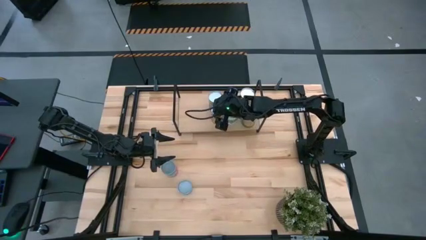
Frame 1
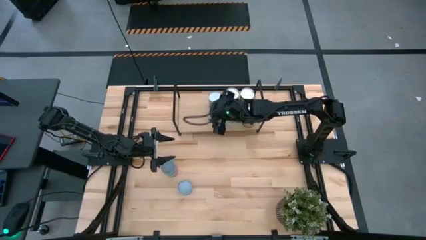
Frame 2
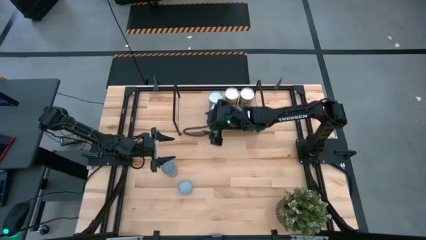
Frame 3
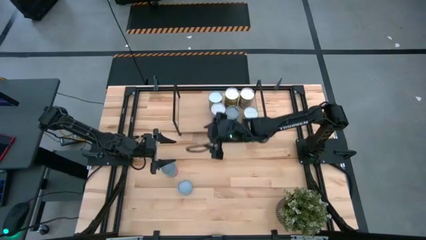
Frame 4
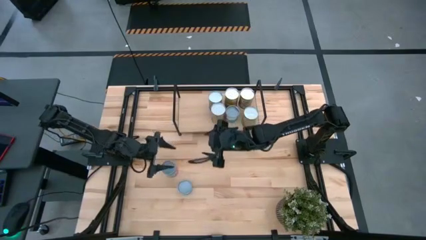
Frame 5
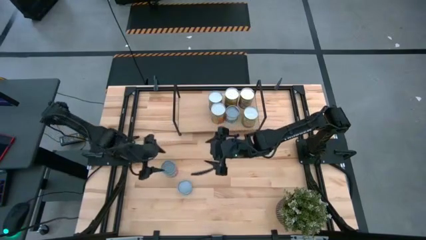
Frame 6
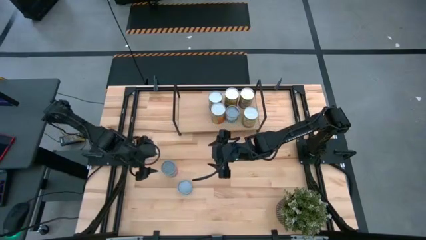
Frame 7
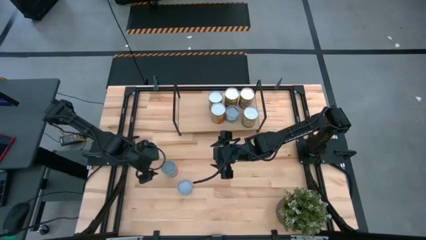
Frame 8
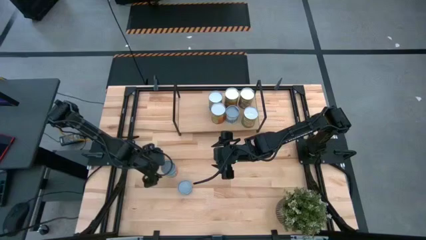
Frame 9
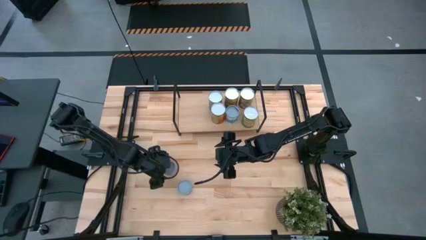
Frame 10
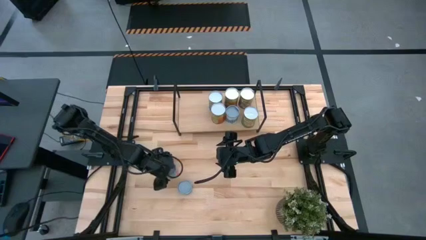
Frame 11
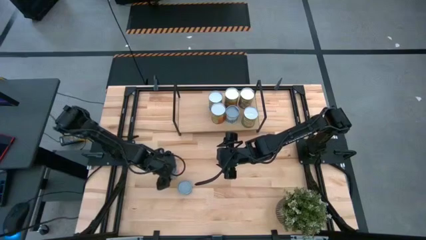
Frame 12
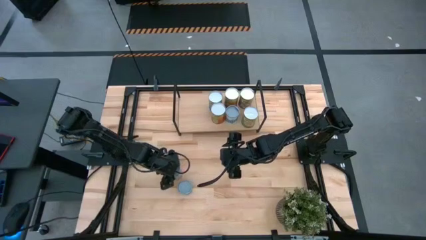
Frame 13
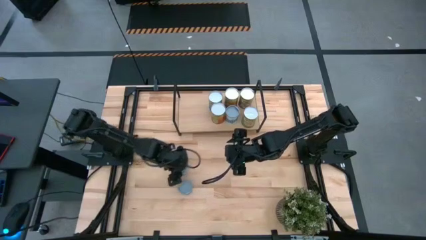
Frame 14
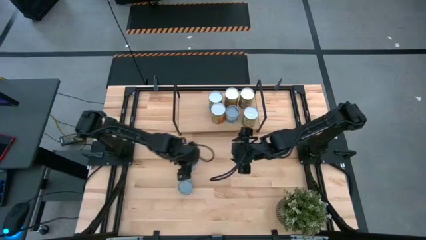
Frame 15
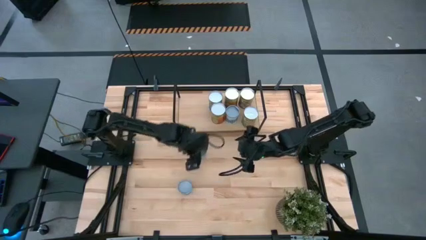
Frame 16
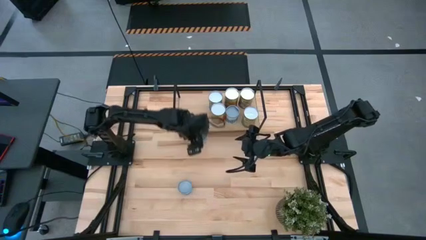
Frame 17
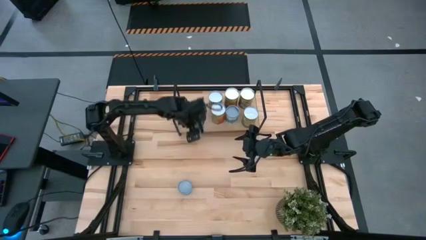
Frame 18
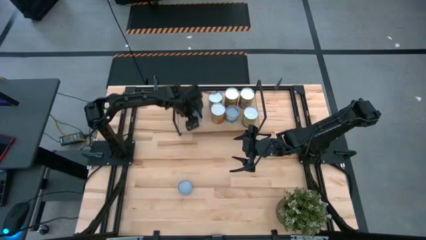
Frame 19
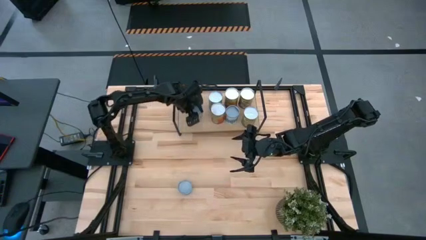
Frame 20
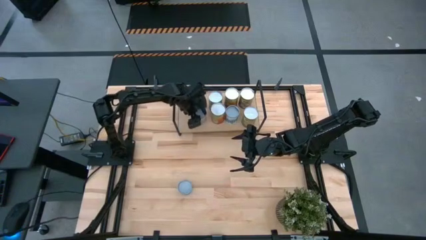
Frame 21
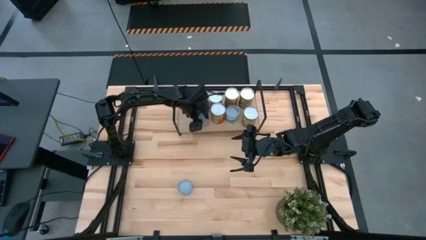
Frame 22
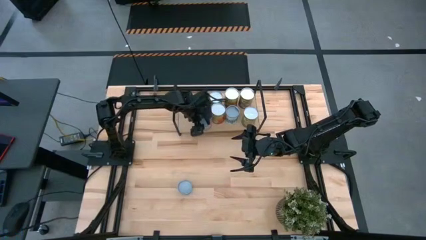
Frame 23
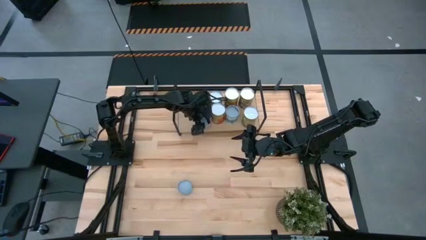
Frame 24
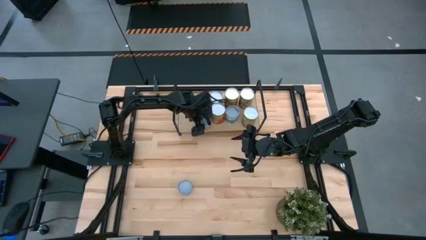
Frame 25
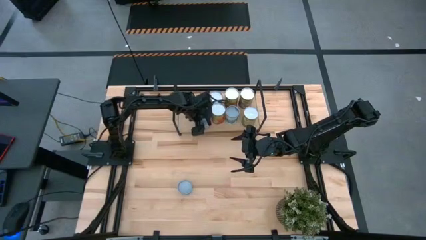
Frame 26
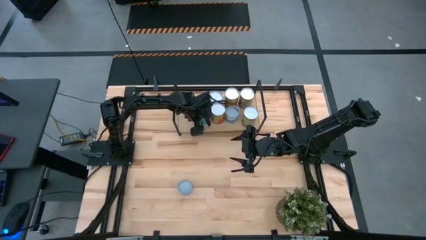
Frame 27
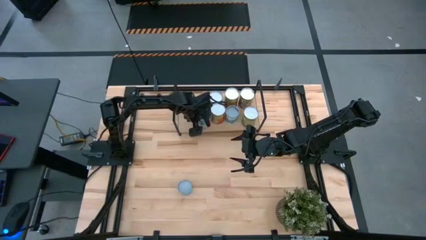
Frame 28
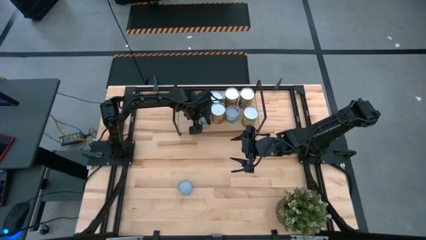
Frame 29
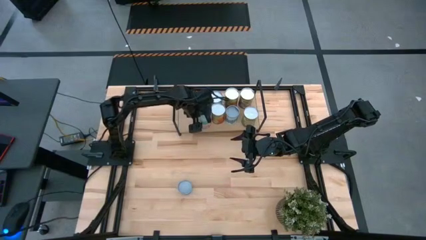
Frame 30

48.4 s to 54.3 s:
Task: Pick and place cans onto a shelf
Put the canned chicken soup on the shelf

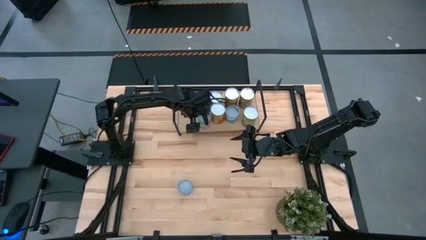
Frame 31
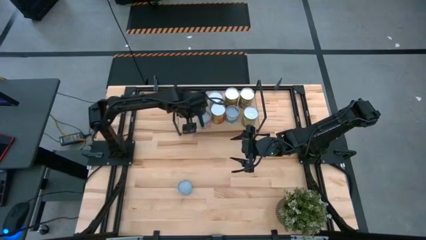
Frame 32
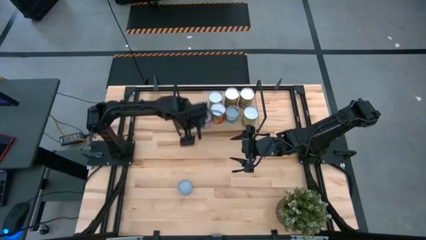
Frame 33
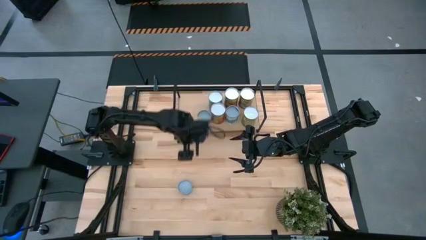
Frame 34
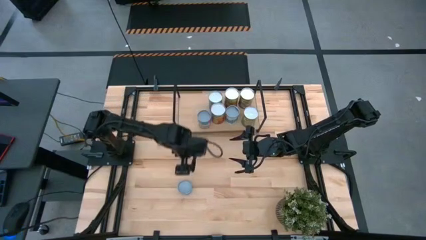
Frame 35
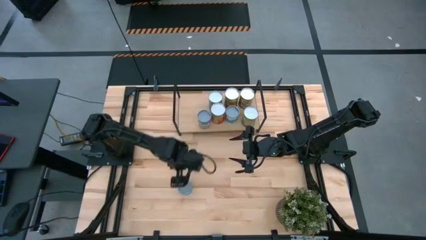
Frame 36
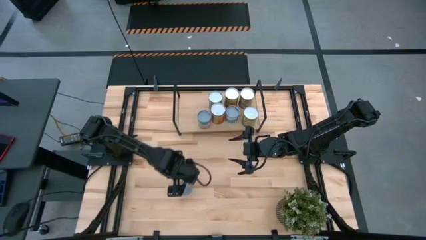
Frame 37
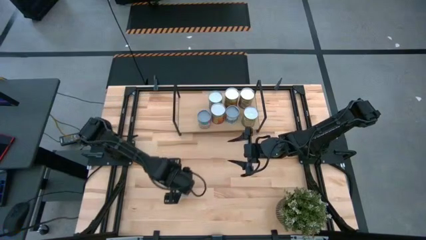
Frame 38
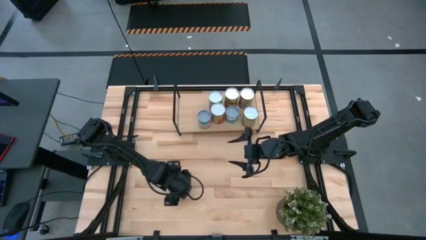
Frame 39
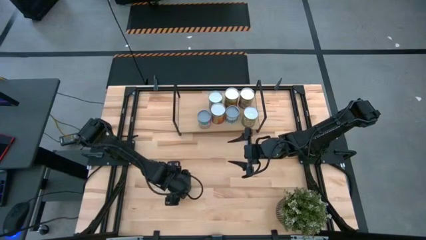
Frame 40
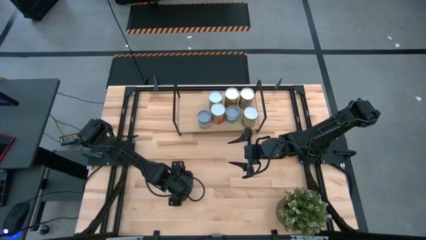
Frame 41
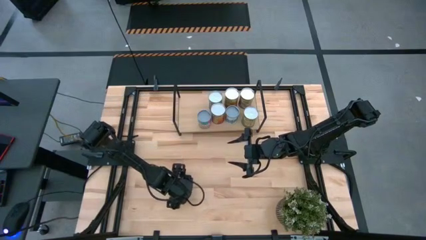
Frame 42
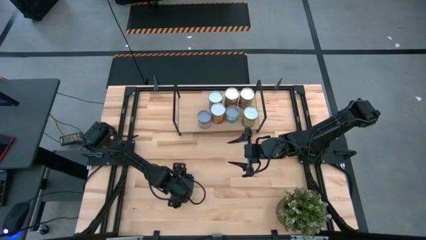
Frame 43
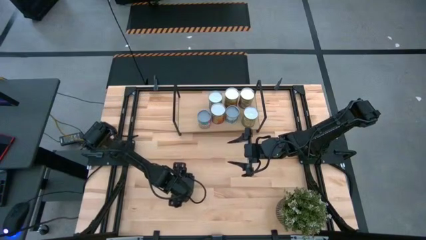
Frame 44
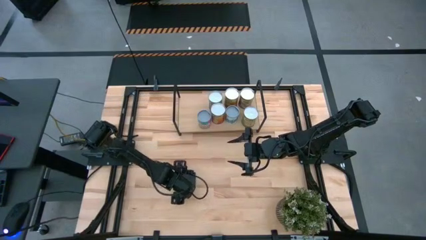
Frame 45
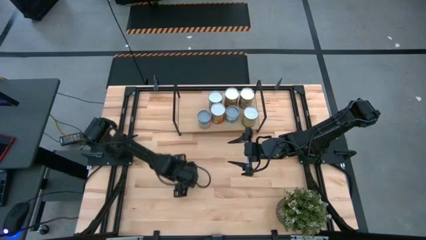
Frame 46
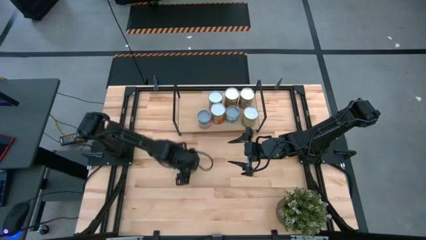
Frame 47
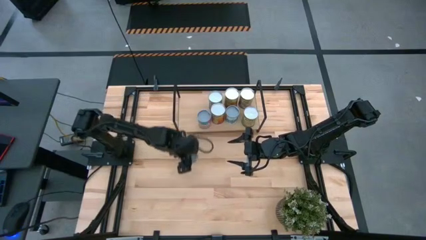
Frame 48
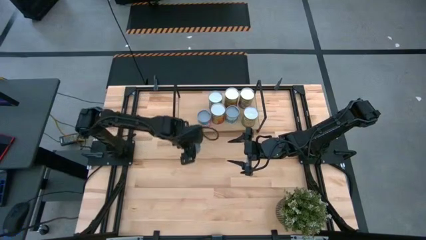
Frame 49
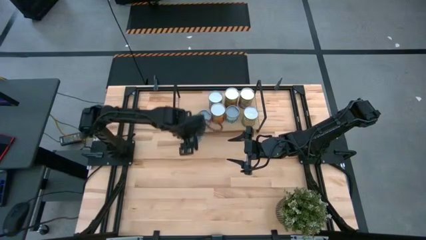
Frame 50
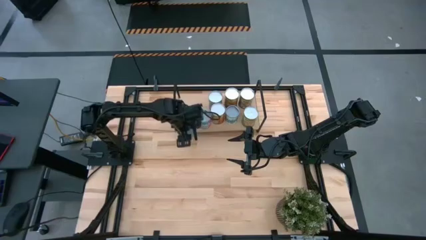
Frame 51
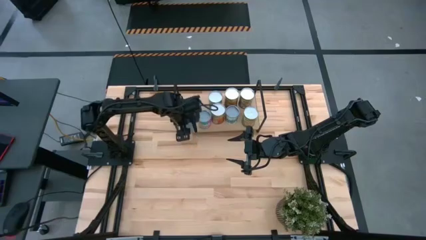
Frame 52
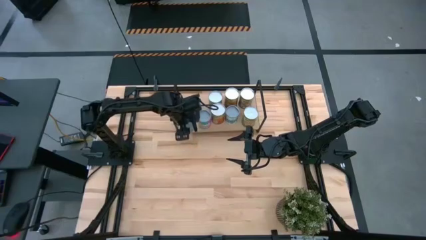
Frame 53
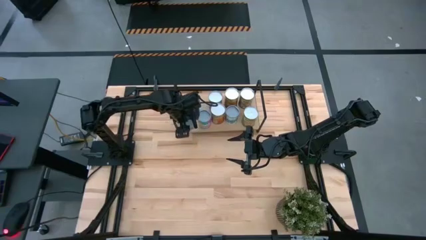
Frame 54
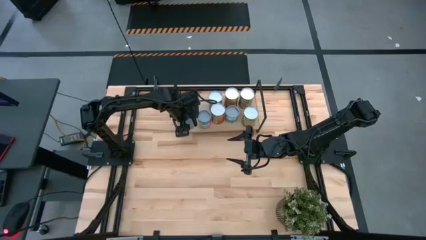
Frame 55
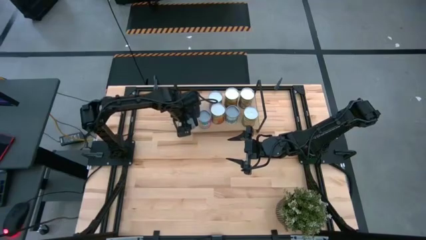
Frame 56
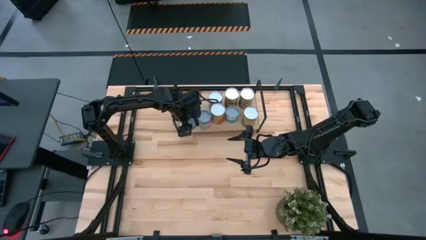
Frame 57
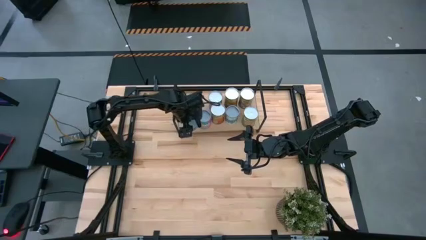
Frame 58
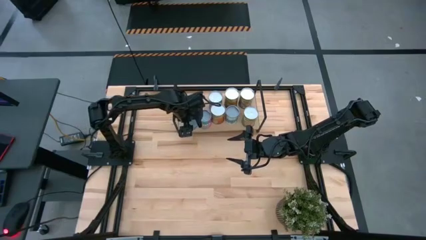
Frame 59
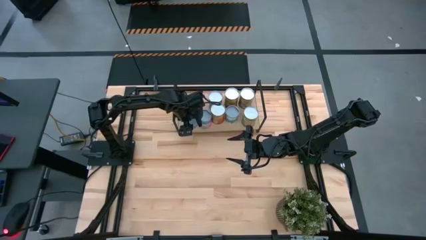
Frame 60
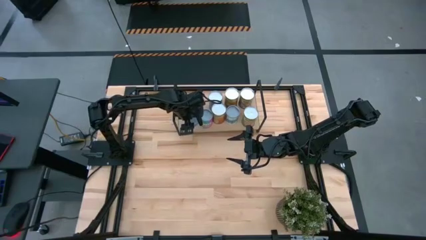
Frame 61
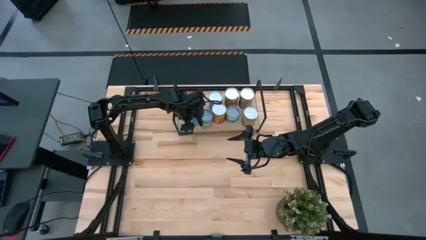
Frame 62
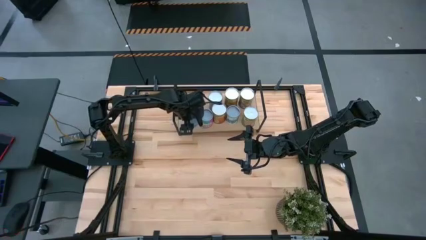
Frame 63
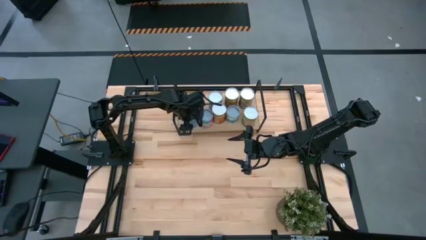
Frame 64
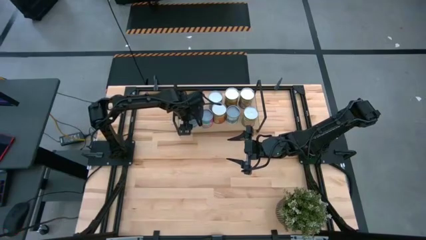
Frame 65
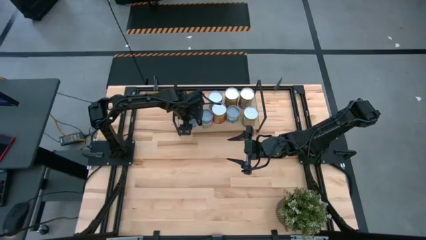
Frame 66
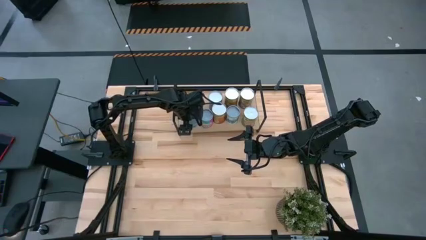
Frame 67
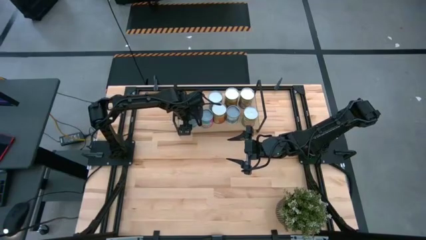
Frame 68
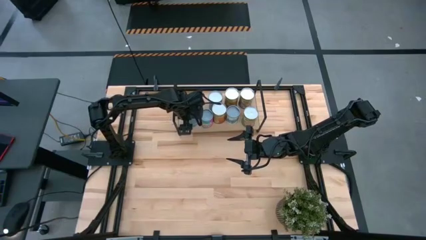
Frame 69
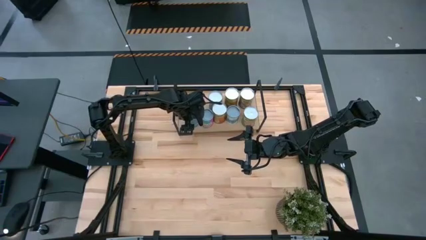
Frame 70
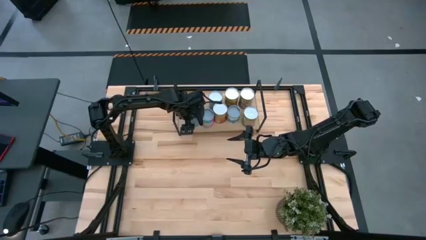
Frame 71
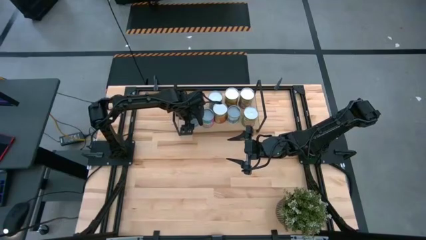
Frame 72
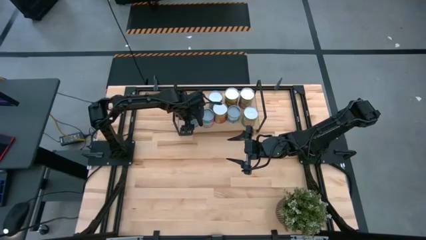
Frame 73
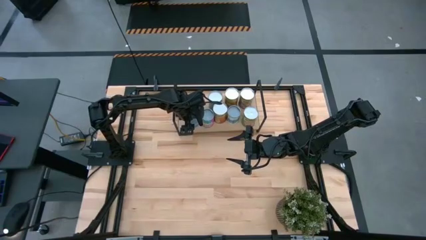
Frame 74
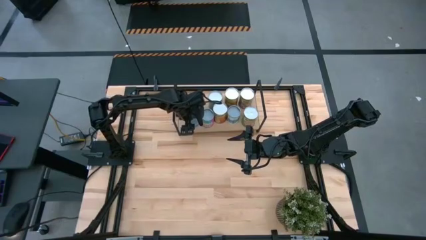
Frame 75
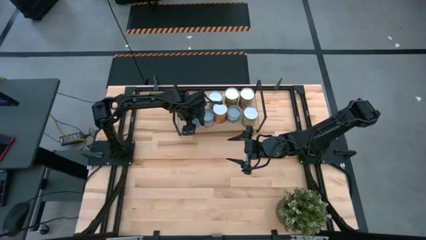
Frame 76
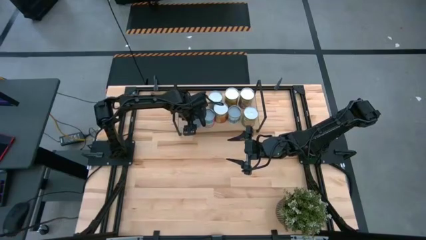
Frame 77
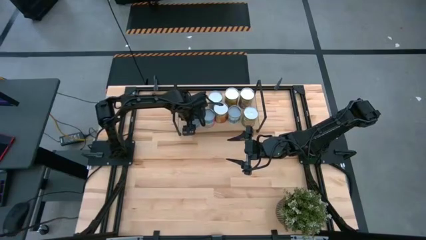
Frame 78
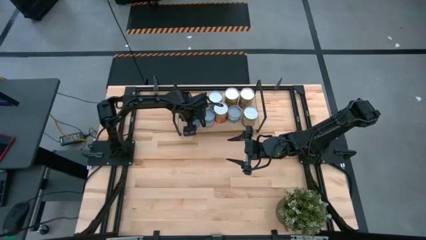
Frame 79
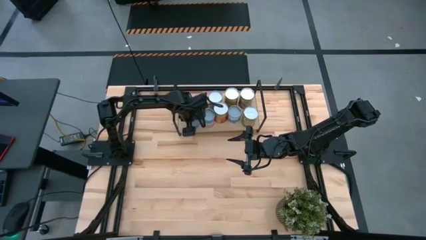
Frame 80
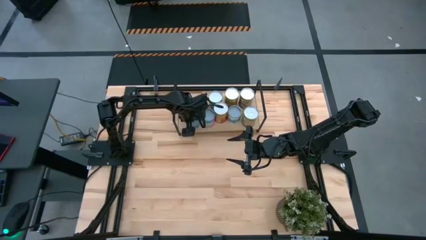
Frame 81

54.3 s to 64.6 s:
Put the canned tuna on the shelf
